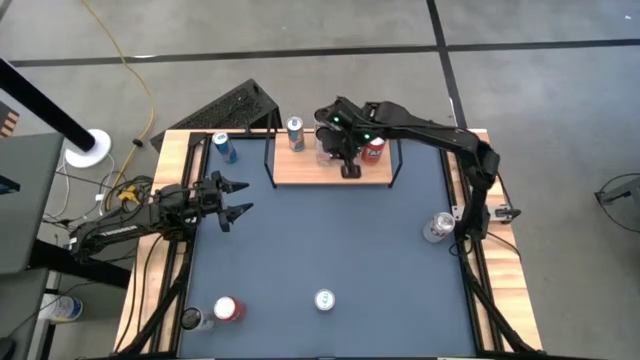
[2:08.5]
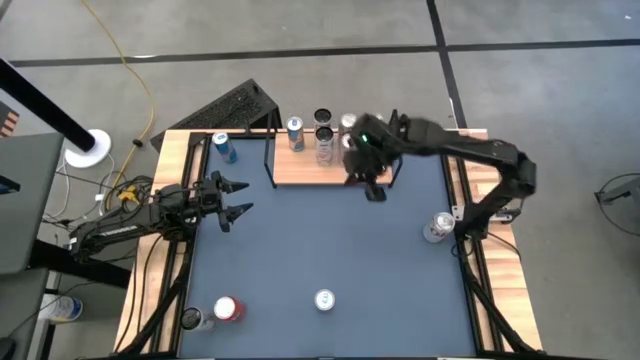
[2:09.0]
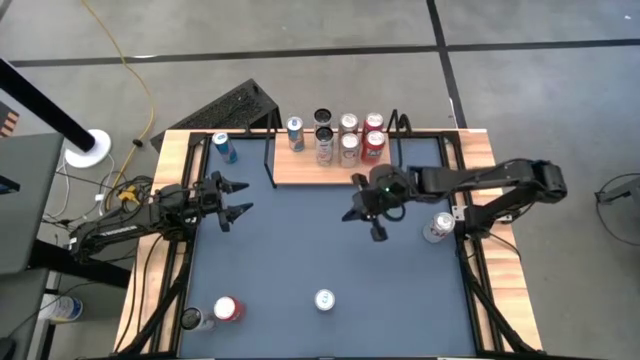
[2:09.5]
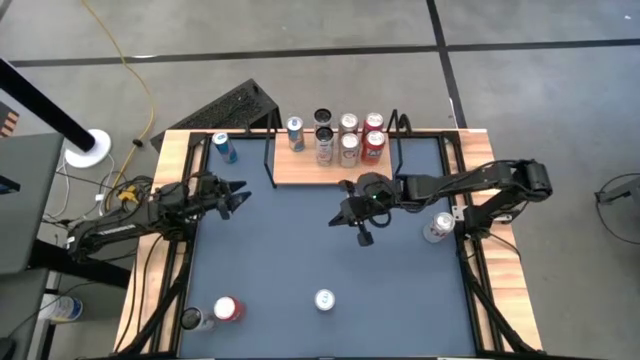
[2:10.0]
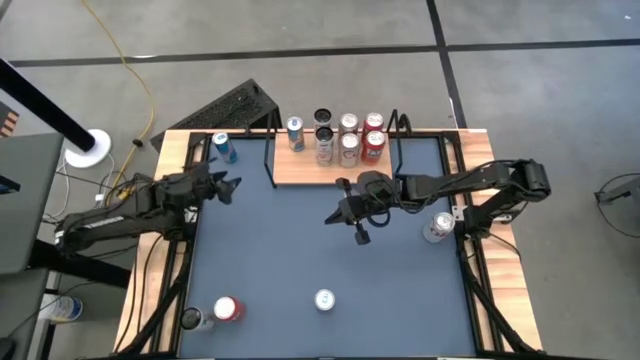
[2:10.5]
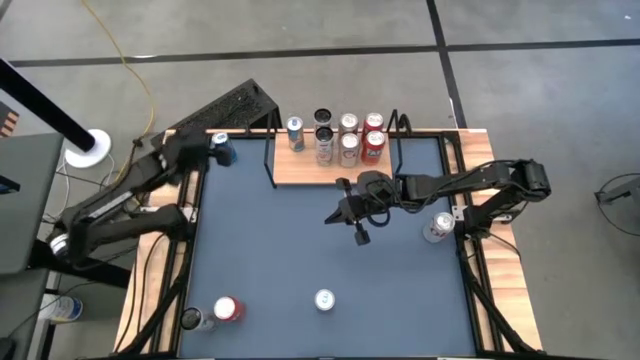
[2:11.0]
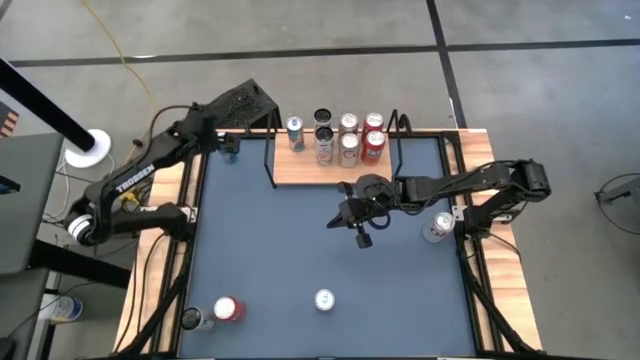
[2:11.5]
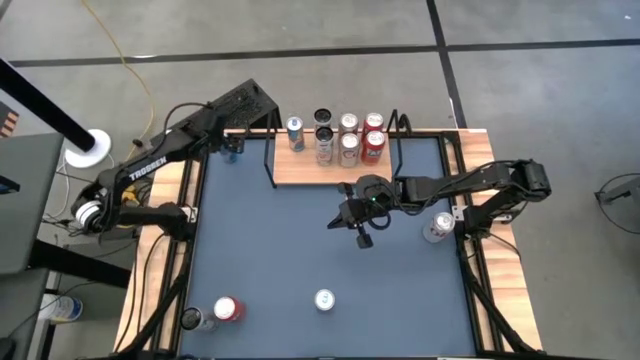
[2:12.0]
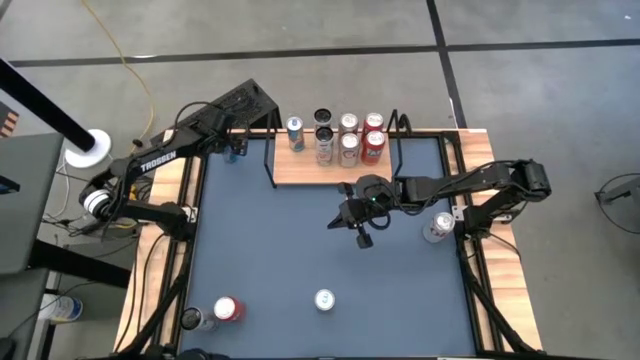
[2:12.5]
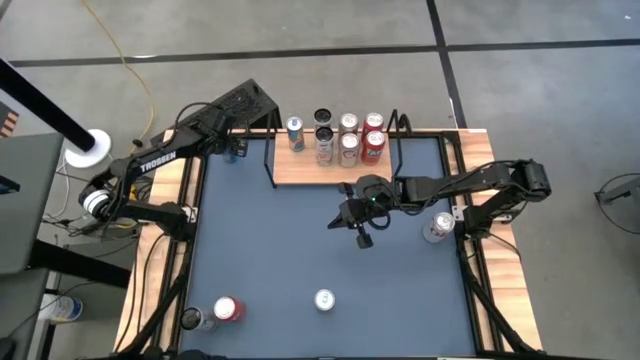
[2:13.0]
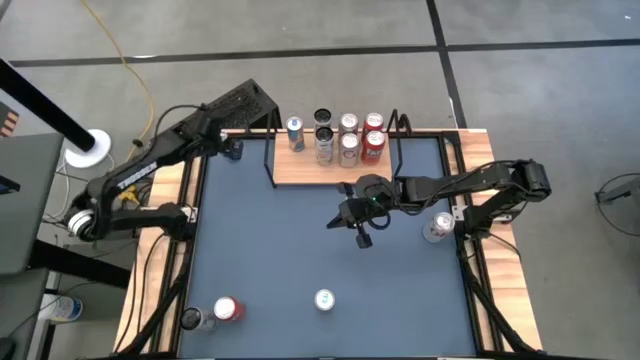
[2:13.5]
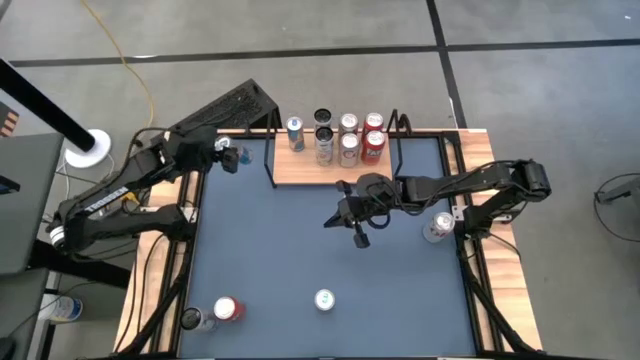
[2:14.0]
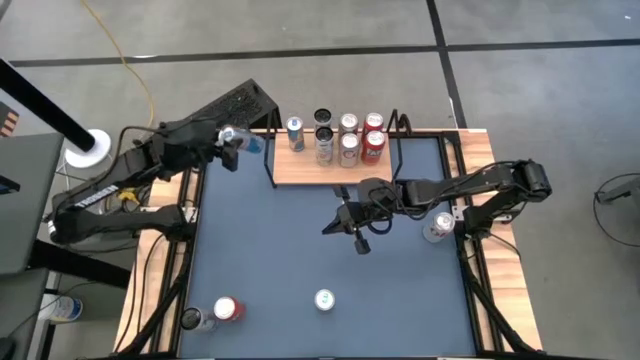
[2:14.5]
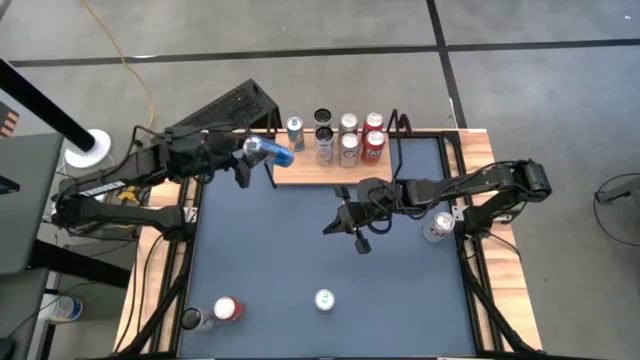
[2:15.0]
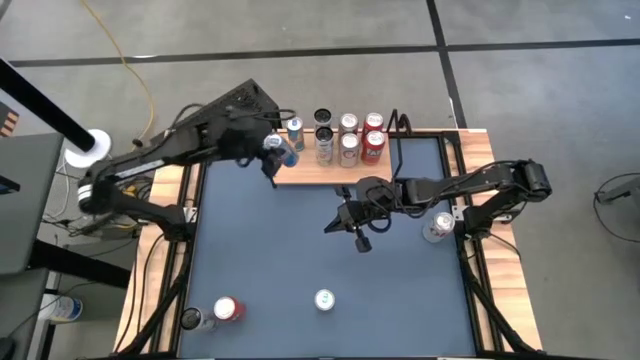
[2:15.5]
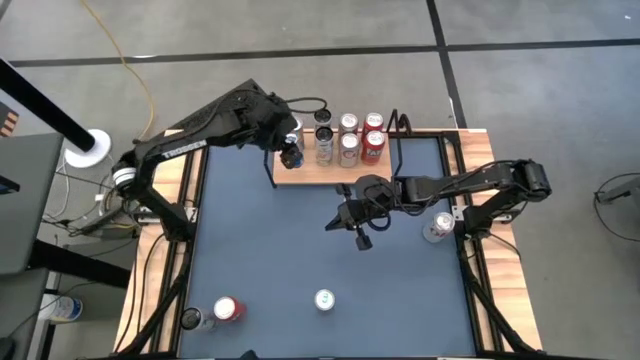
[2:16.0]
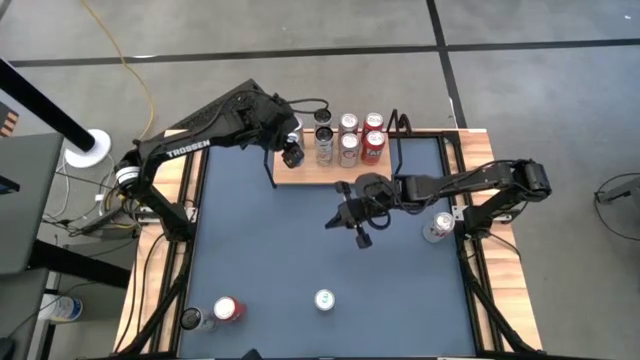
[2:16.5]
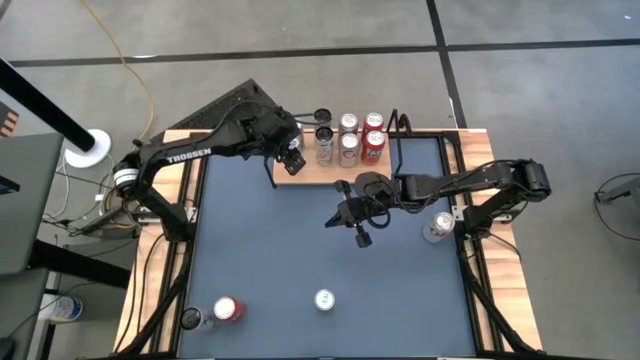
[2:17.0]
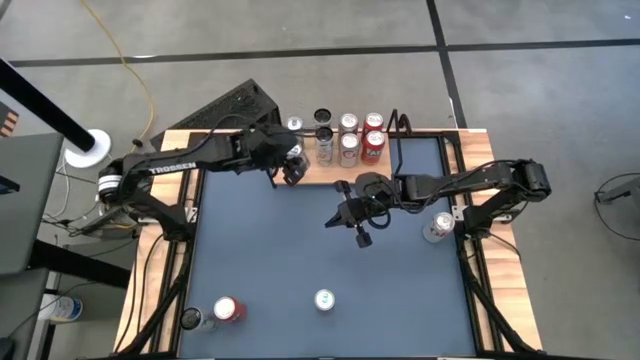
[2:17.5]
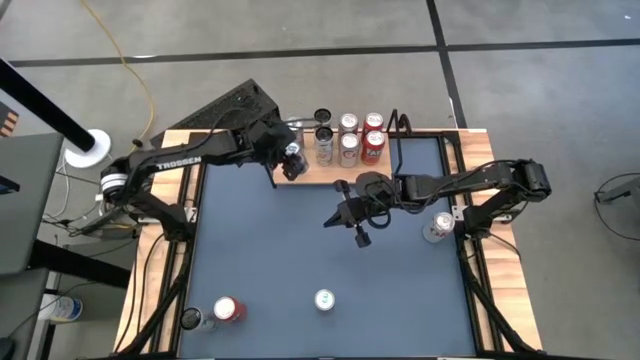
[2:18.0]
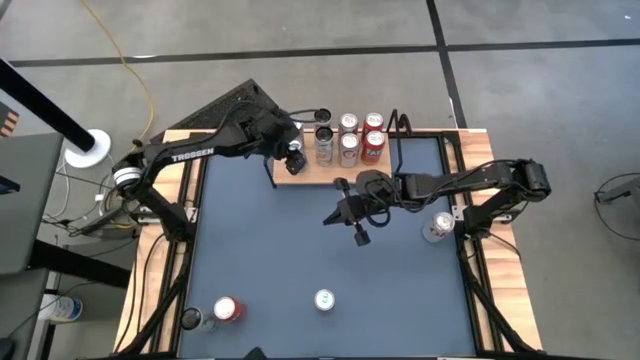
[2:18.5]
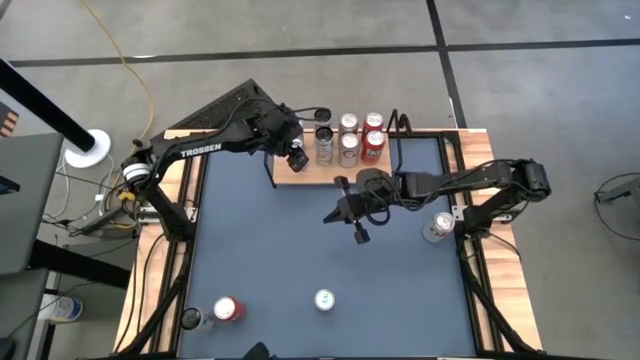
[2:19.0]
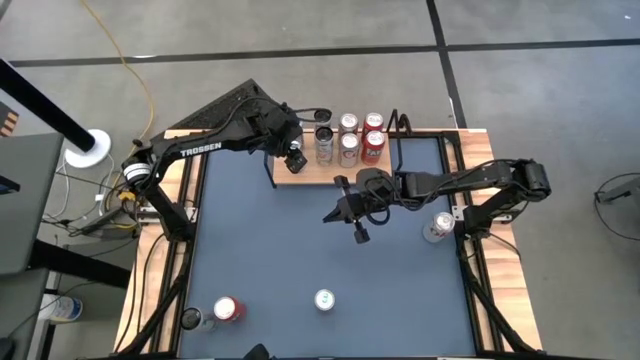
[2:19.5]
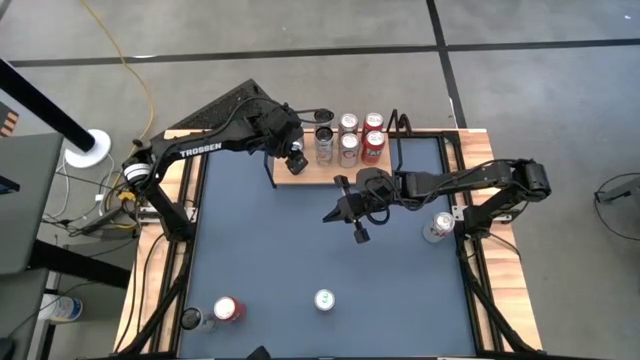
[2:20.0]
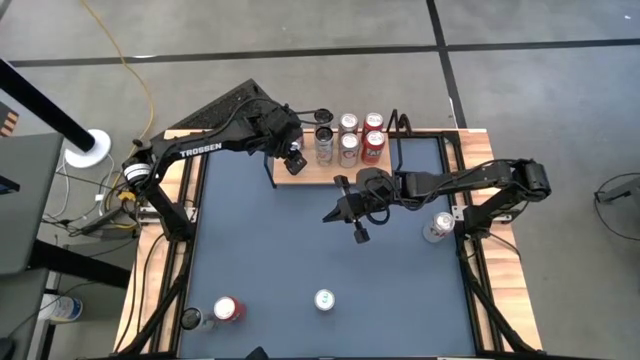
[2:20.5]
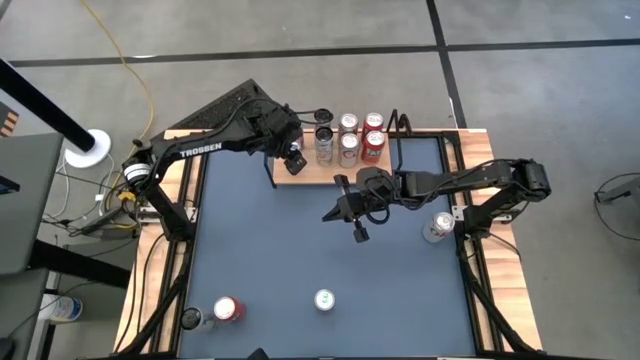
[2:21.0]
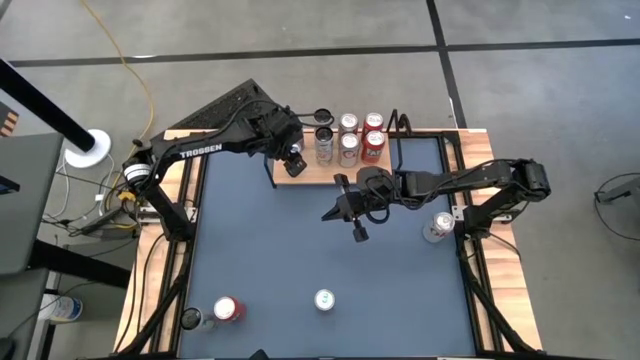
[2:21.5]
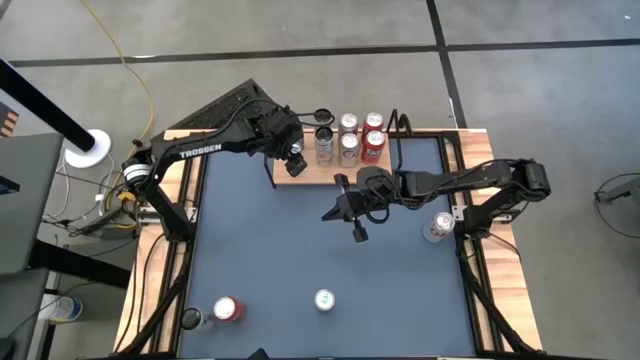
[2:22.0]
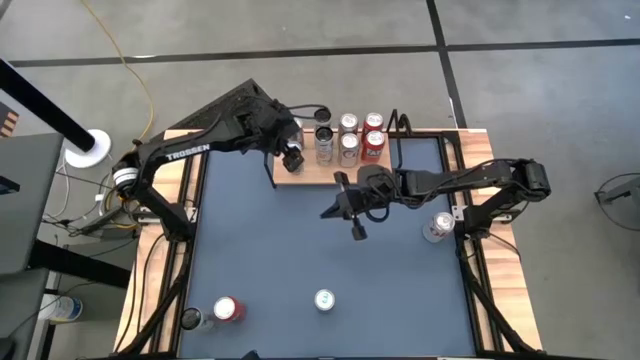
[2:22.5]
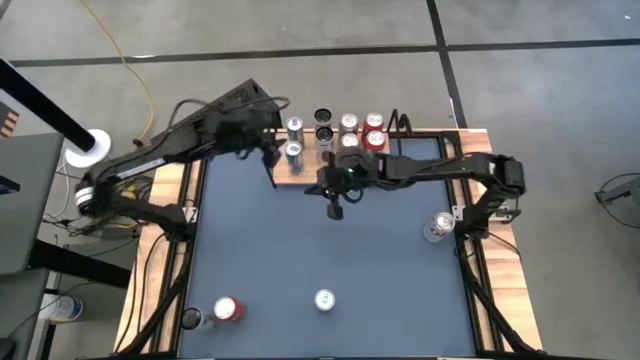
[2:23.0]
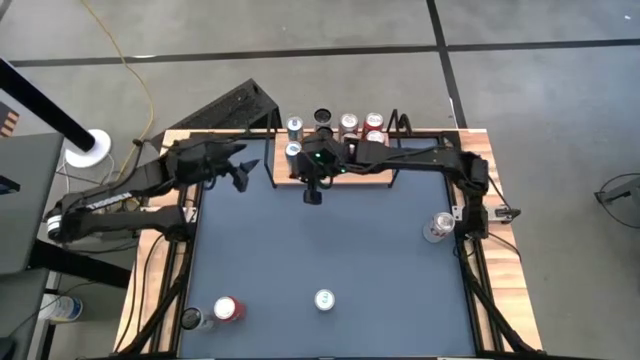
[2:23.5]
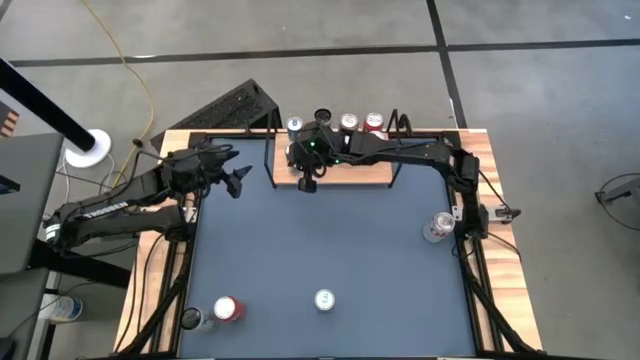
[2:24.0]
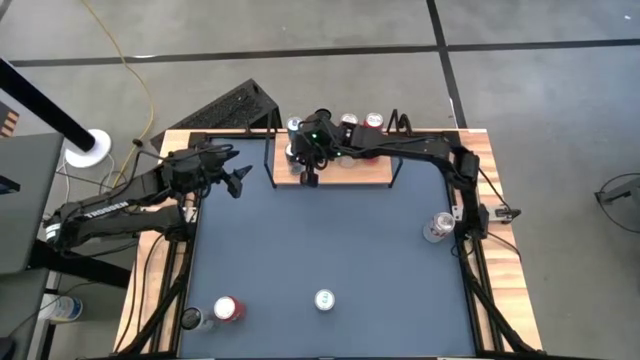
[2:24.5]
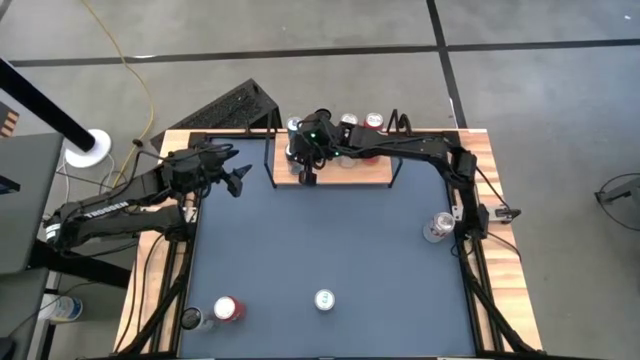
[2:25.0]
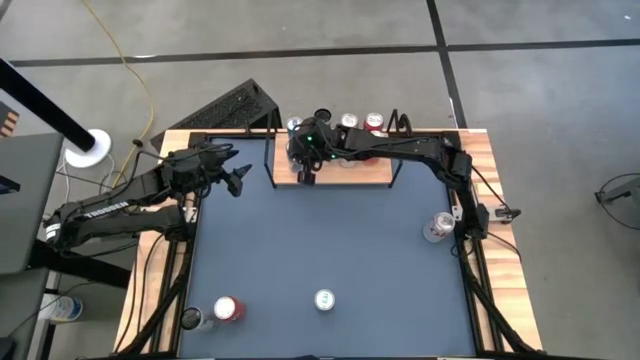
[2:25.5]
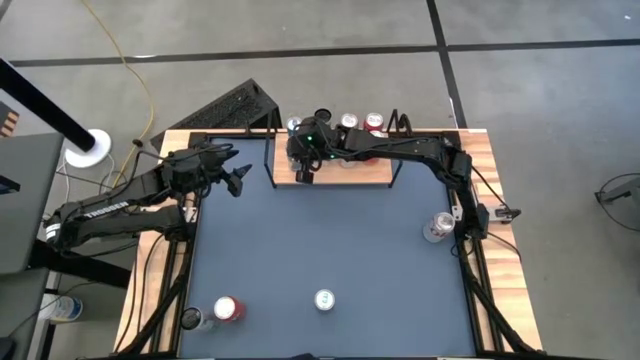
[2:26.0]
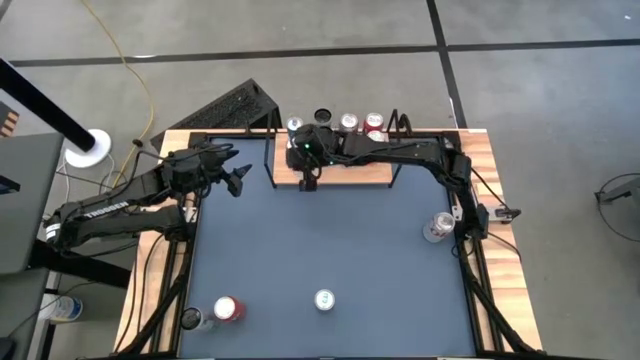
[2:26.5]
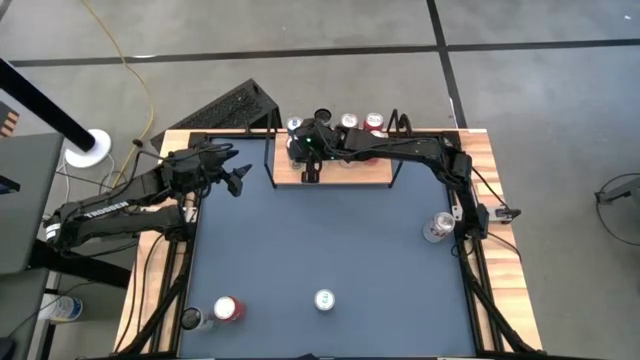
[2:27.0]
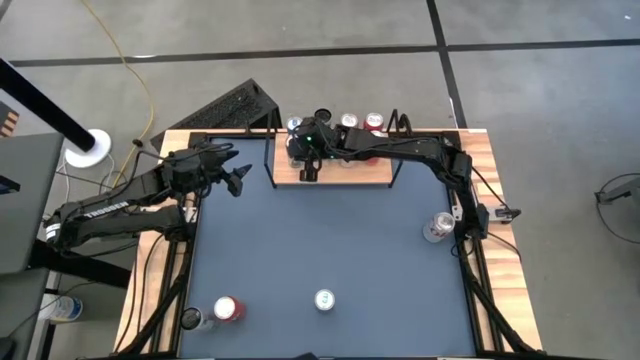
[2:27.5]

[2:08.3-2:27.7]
Task: Place canned beverage on shelf
Put the top blue soda can on the shelf aligned with the other blue soda can

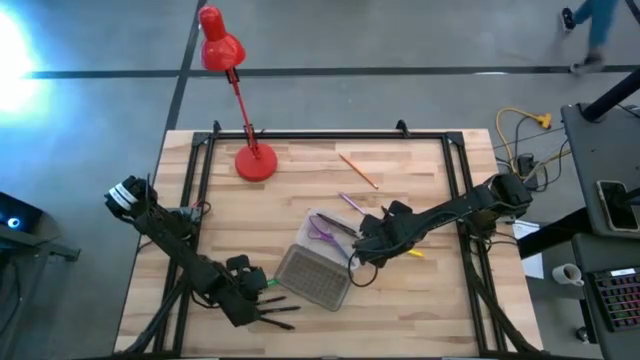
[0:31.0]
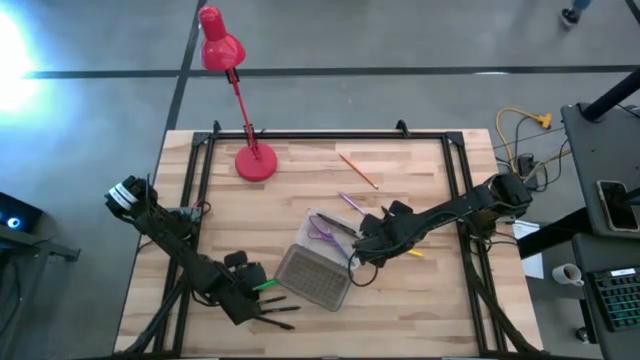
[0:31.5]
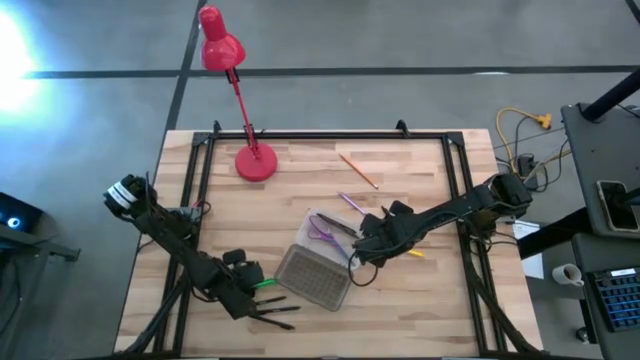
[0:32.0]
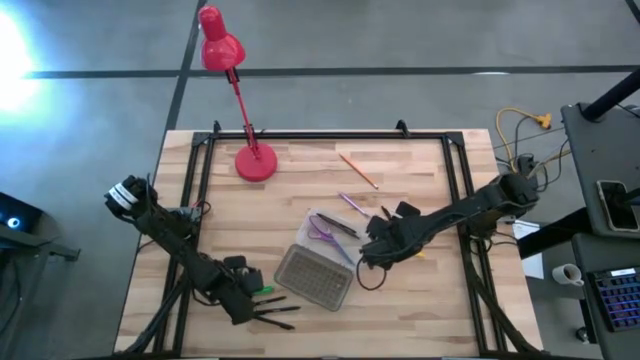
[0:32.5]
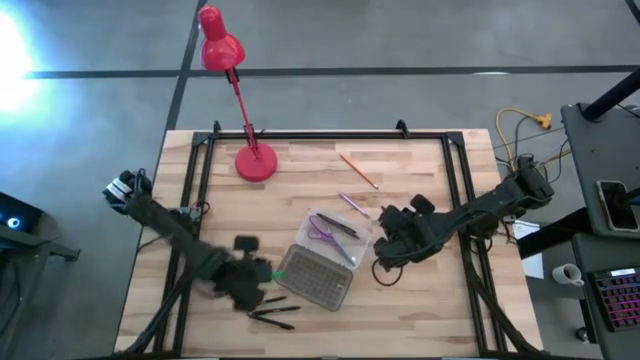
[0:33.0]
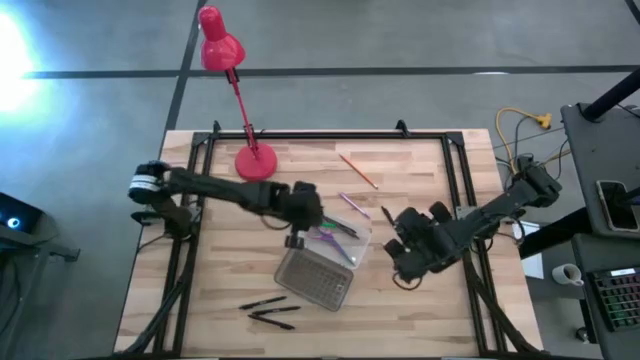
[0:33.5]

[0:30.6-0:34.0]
Task: Pick & place school supplies into a supply box
Put the green pen into the supply box
